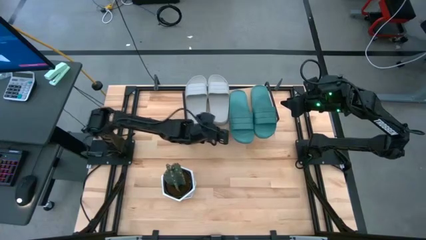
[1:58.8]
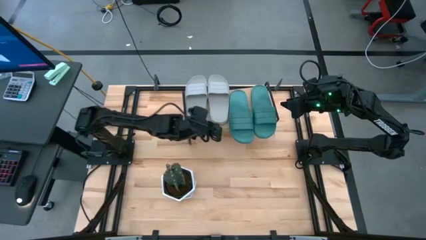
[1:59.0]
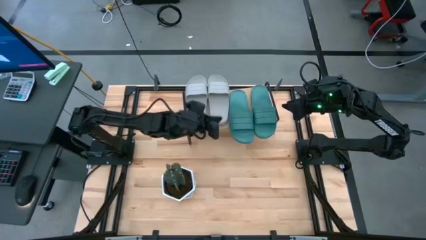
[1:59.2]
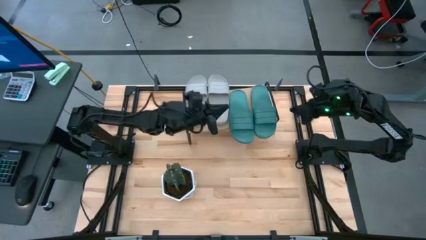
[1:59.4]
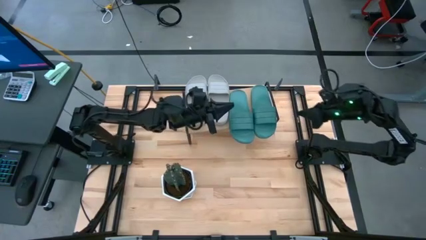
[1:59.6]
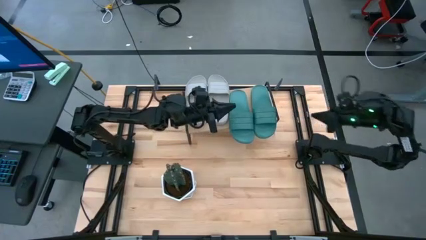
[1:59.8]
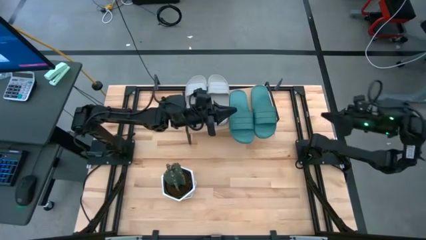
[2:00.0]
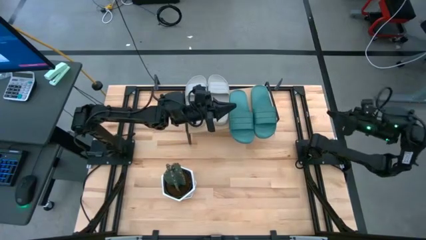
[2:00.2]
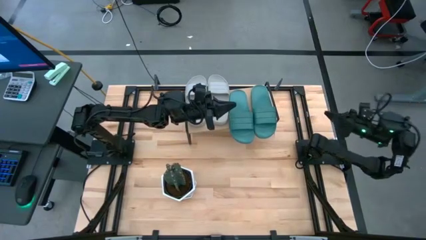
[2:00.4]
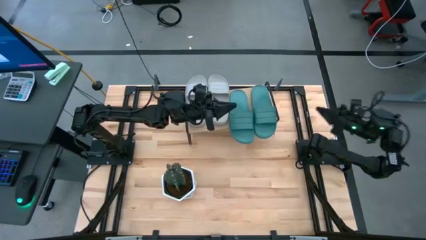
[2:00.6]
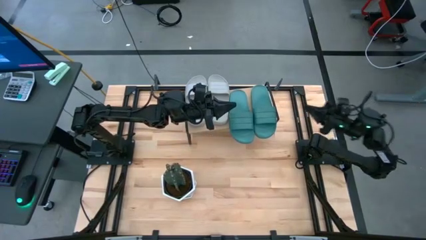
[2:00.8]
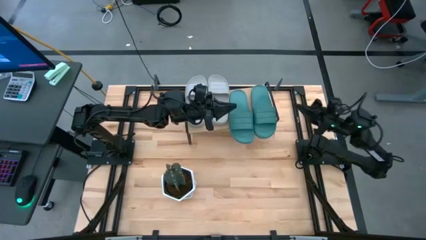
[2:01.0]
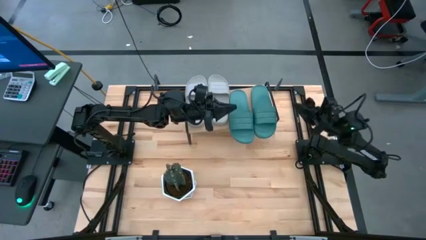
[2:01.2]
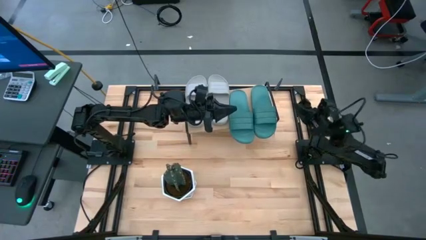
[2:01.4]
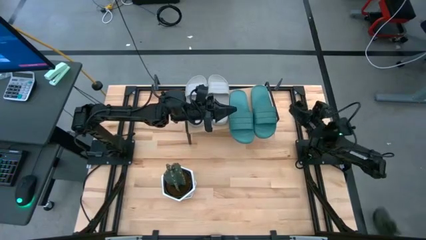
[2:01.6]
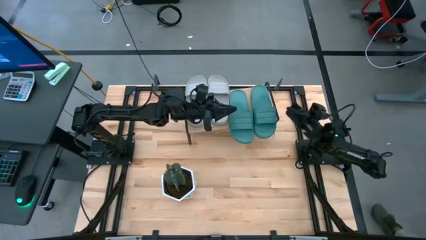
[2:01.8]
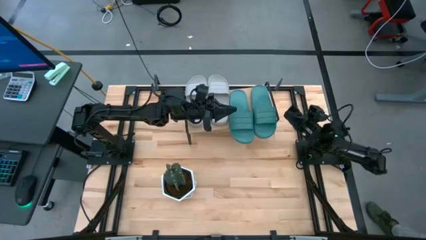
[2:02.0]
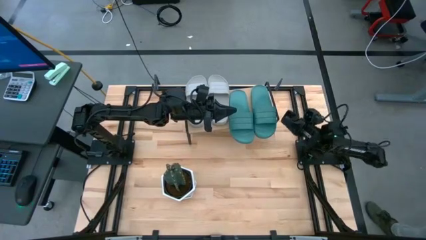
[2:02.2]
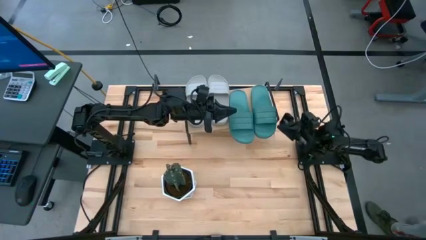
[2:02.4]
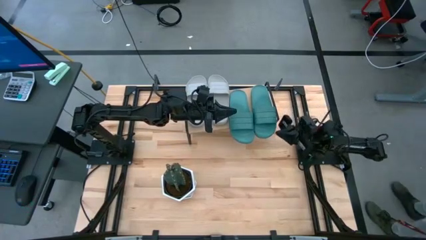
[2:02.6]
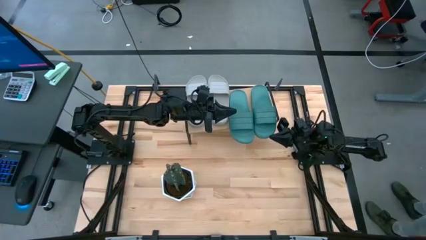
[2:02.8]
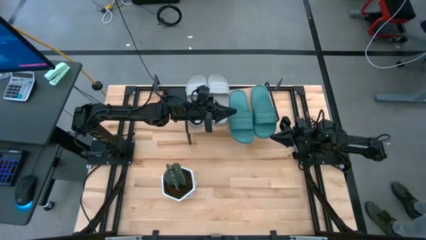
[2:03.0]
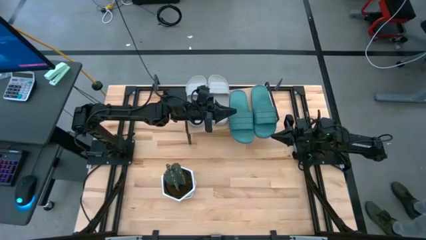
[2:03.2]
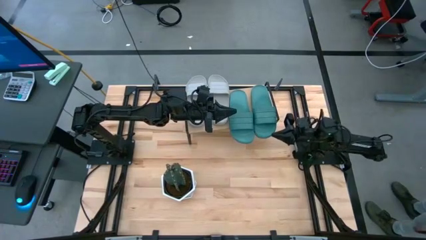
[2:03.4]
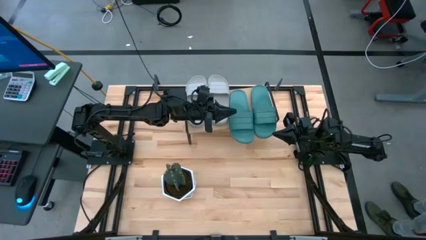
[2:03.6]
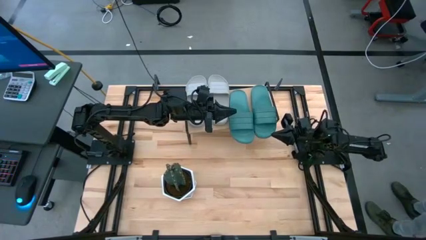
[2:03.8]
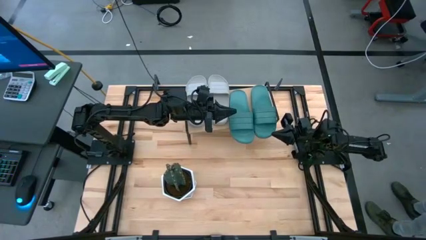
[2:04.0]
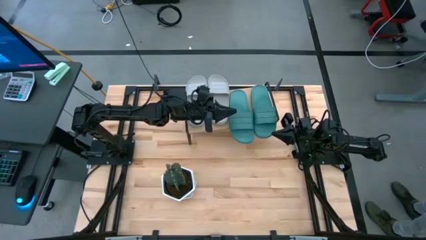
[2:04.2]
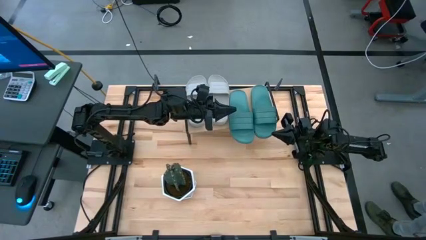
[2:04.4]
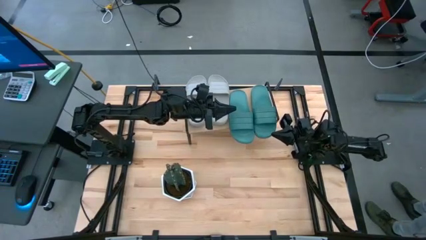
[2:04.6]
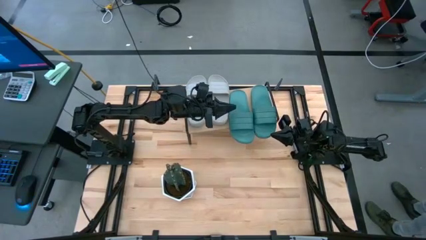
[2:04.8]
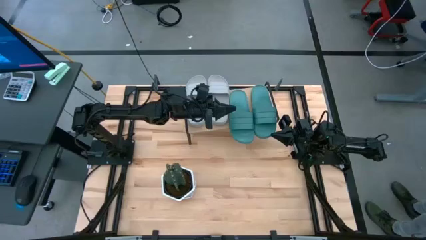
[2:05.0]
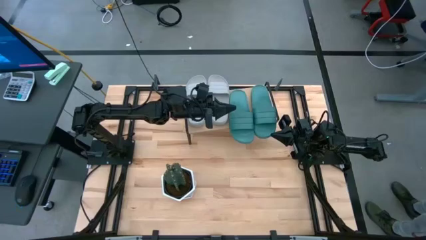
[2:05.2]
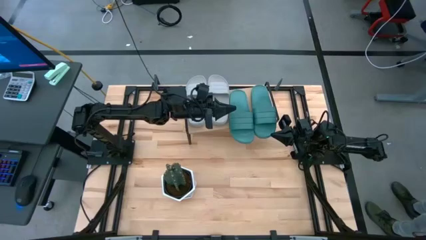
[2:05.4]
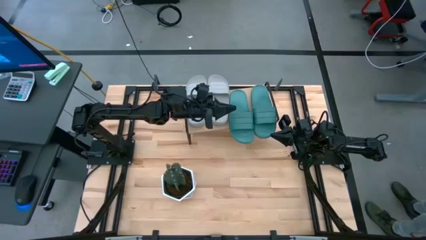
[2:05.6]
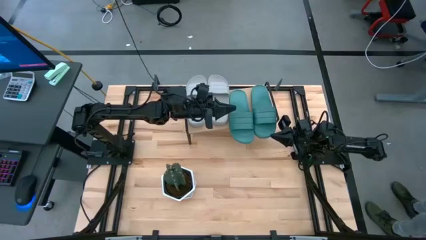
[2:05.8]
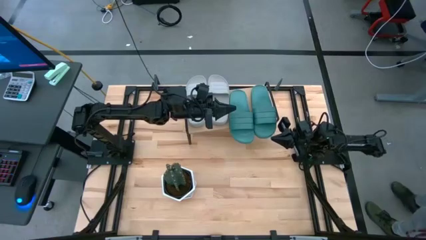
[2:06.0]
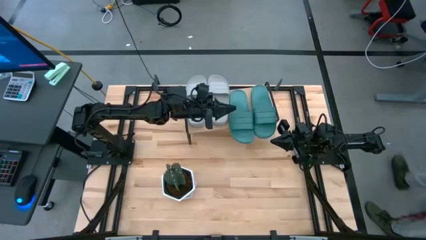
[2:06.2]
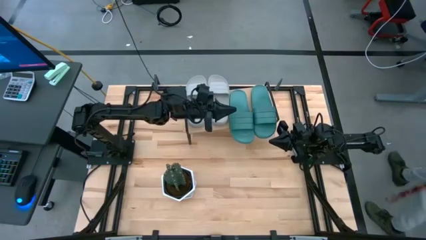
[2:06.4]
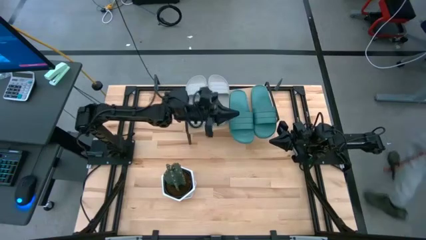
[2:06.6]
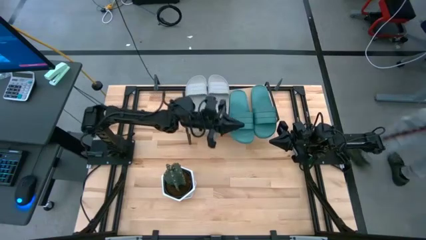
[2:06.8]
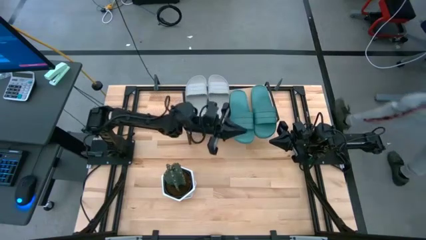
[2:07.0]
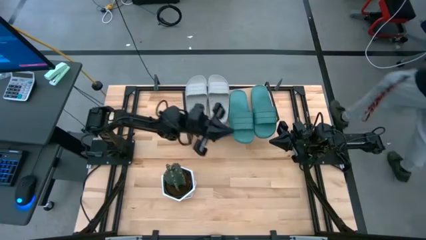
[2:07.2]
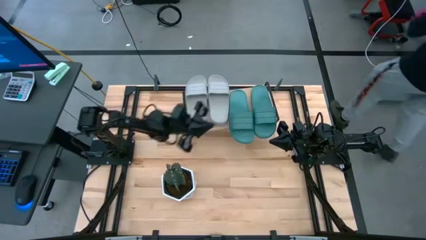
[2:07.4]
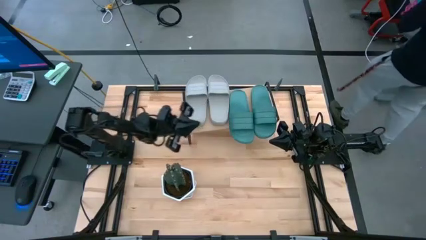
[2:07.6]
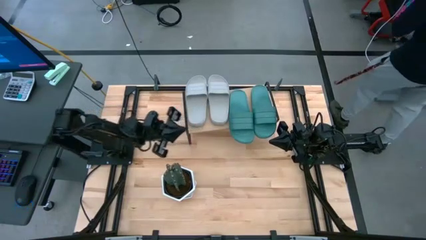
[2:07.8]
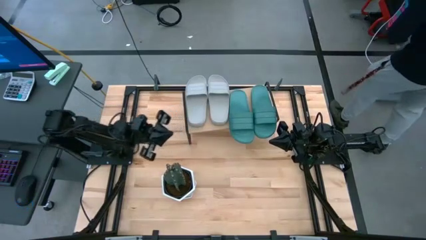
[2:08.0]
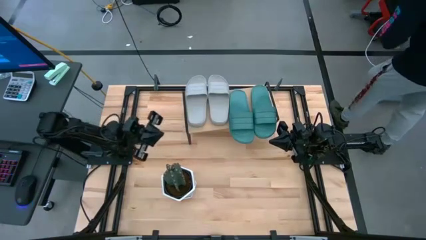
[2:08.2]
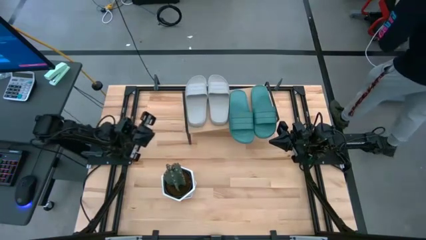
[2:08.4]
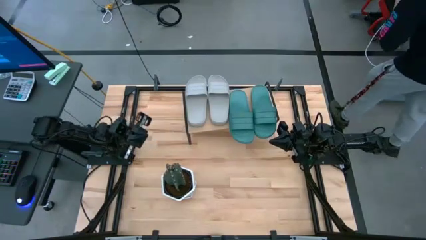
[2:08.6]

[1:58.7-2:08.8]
Task: Pick and place slides into the shelf
Return to Home Position

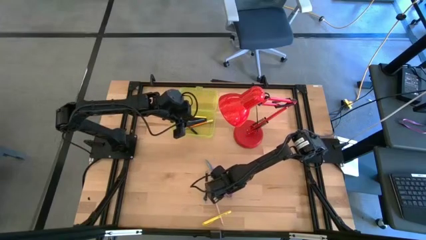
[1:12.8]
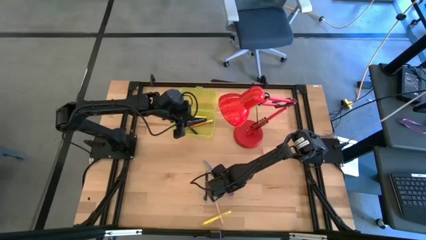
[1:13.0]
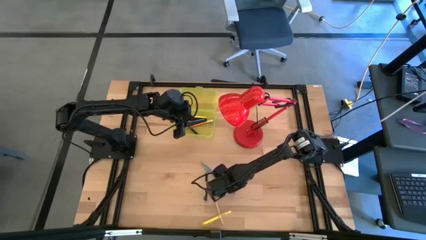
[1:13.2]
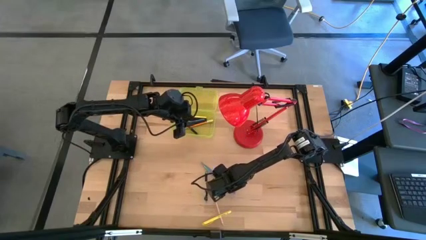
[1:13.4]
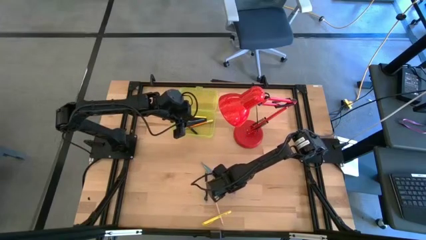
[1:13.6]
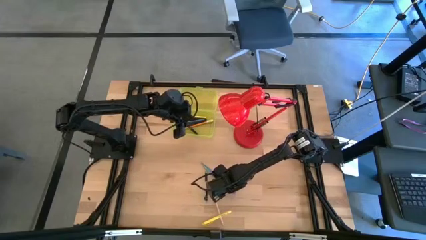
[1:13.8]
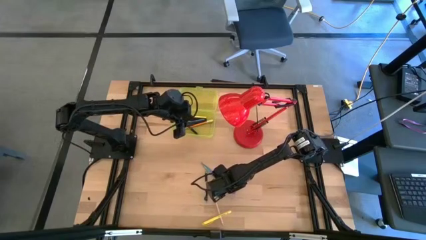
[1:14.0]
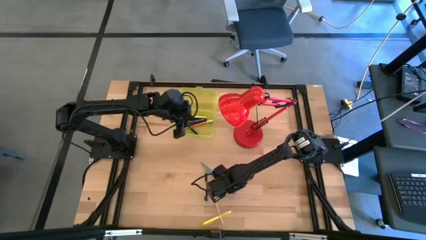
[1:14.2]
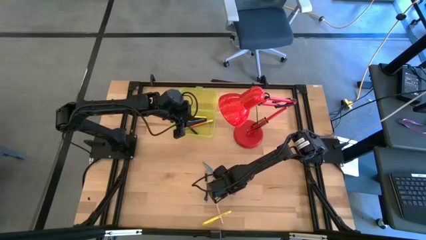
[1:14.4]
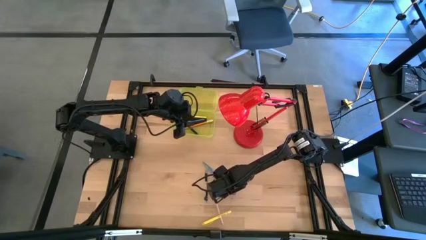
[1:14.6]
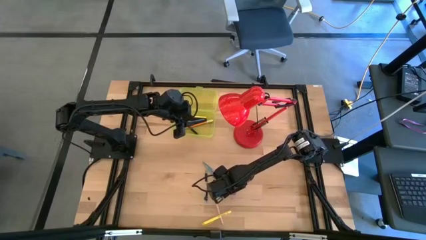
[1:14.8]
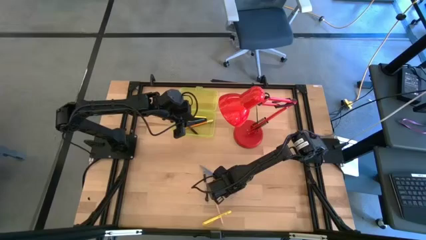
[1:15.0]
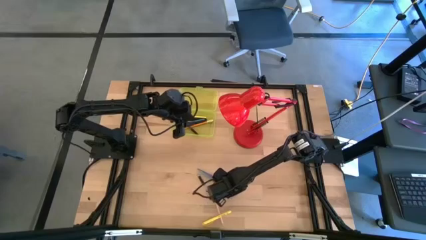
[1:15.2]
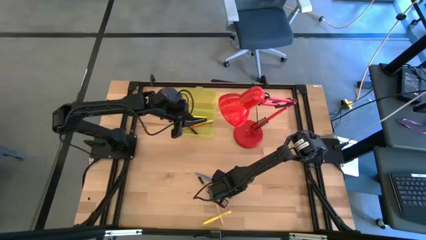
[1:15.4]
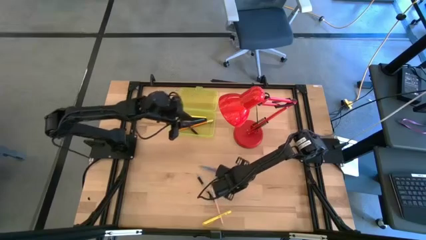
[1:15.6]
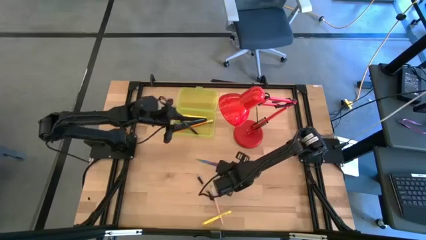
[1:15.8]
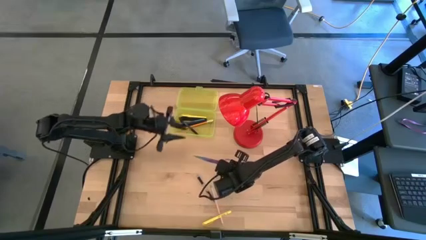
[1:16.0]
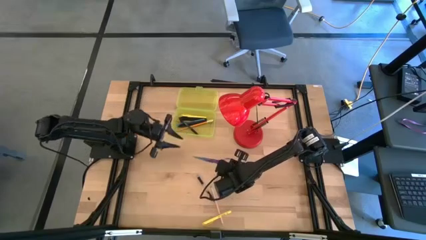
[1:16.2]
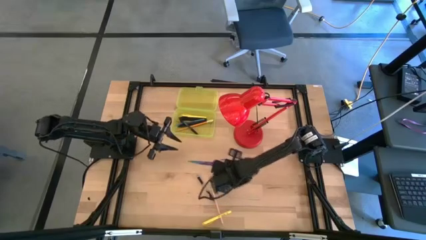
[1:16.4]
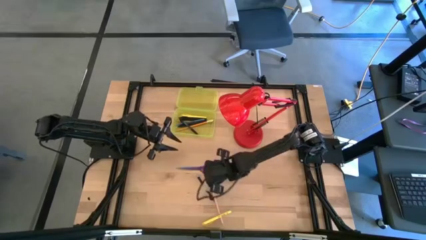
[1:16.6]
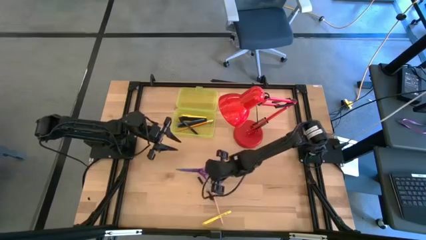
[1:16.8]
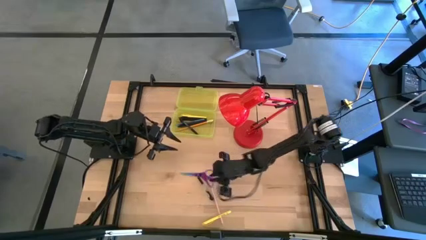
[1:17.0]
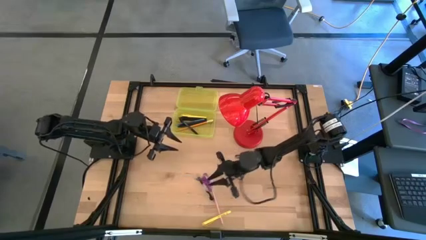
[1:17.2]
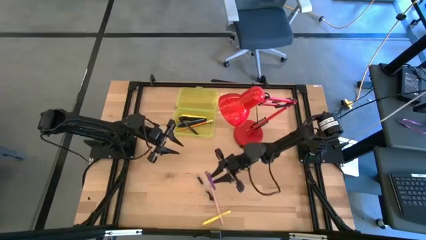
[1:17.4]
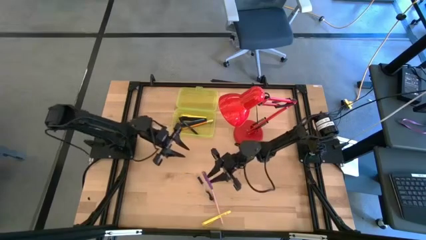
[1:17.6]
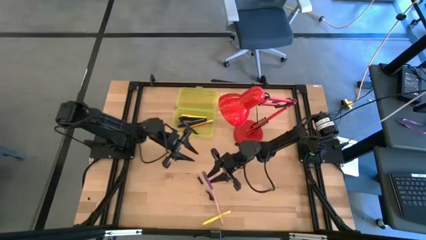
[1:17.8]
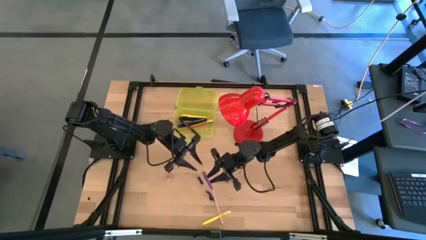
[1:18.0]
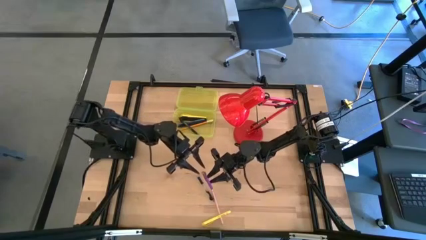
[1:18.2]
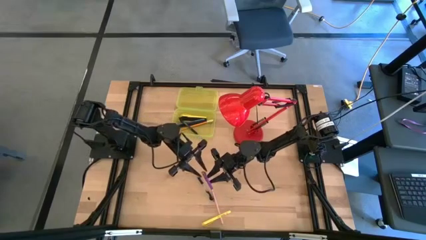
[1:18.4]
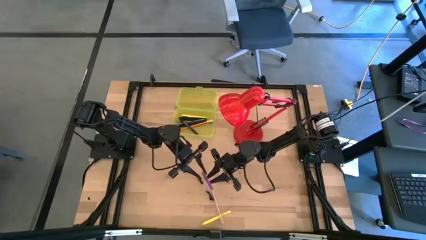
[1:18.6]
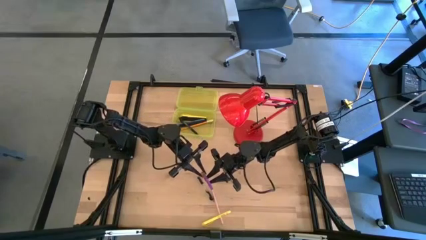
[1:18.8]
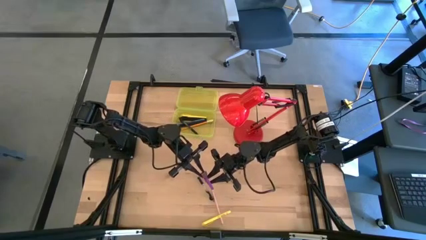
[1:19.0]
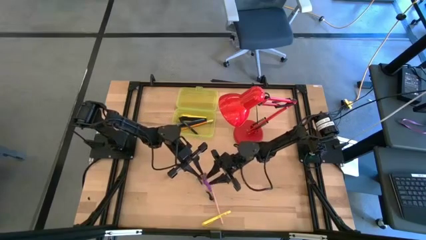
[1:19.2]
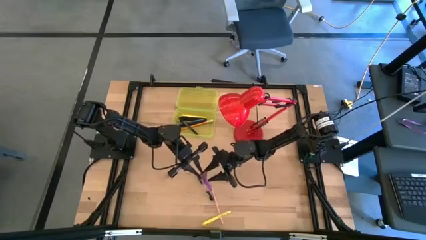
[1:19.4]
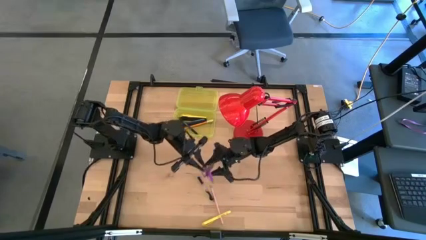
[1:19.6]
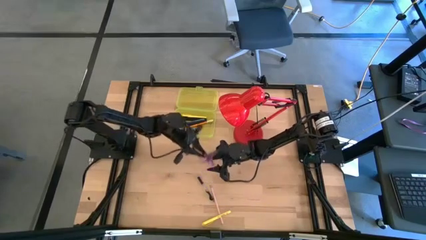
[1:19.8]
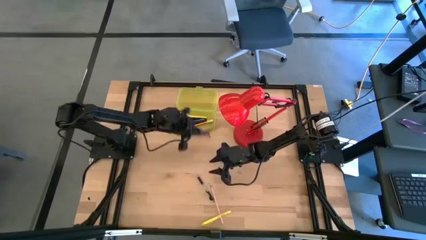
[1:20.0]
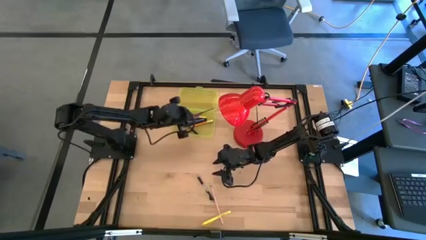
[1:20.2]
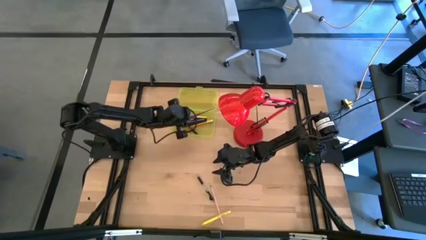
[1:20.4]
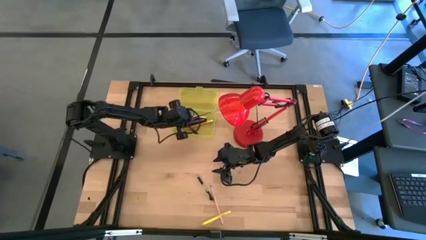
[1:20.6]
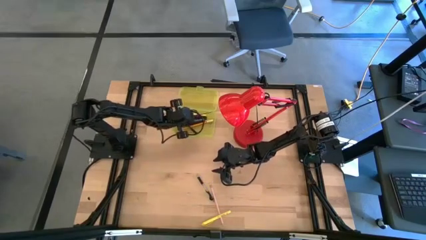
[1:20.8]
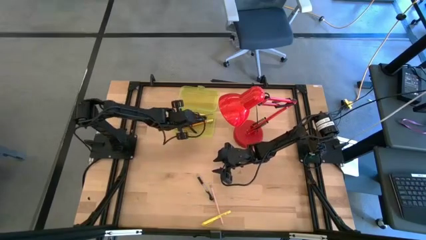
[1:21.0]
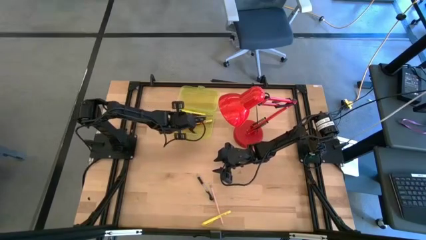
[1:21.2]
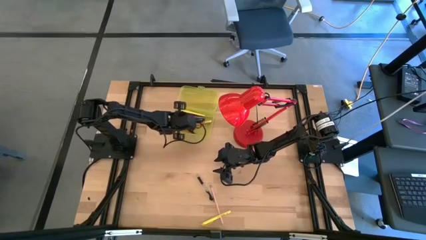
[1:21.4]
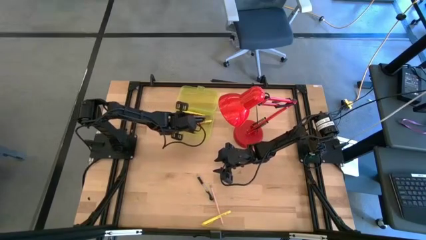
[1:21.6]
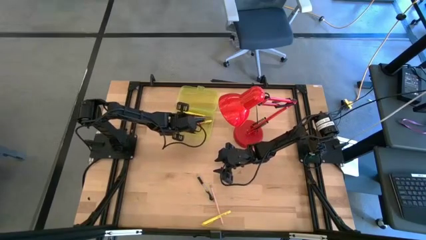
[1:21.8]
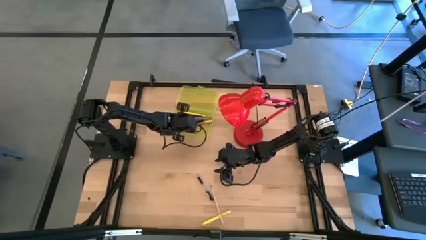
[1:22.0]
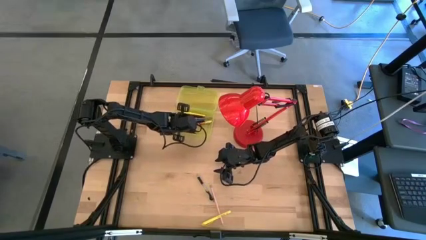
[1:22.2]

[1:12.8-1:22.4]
Task: Pick & place school supplies into a supply box
Put the purple scissors into the yellow supply box
